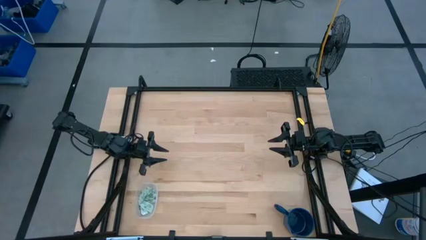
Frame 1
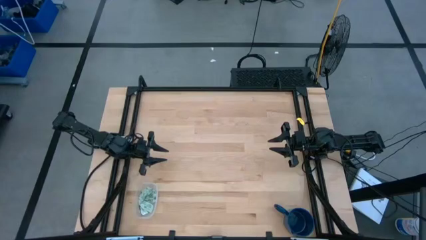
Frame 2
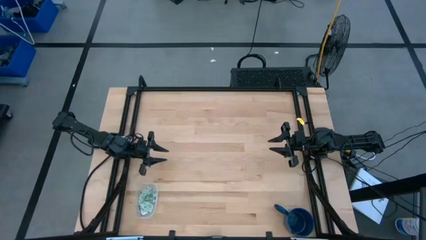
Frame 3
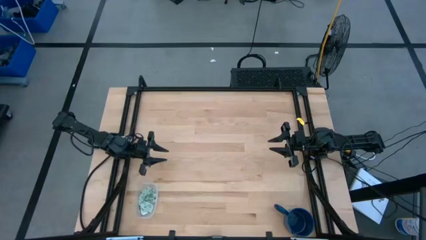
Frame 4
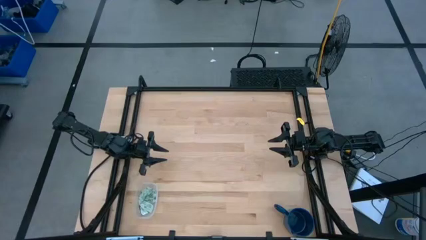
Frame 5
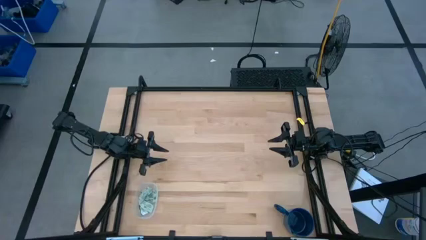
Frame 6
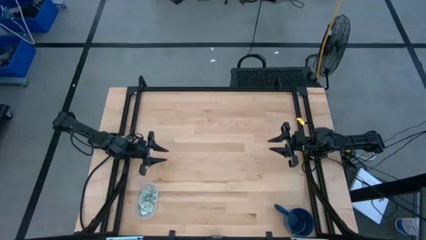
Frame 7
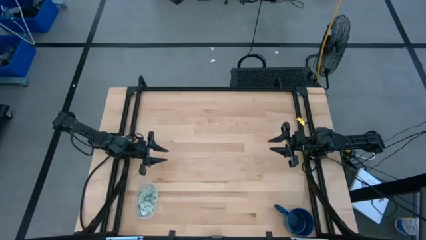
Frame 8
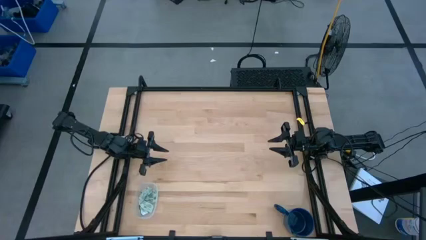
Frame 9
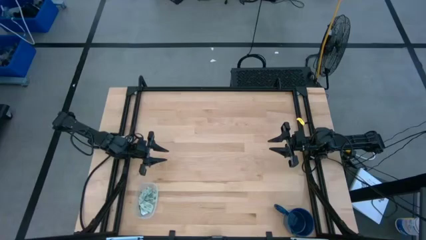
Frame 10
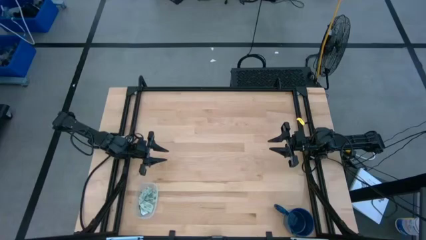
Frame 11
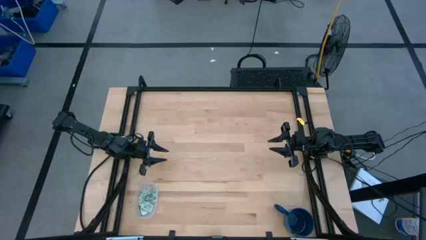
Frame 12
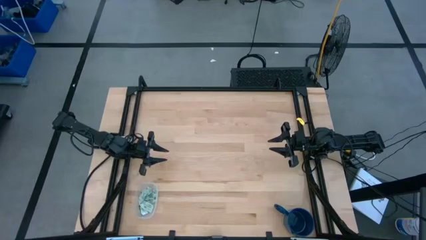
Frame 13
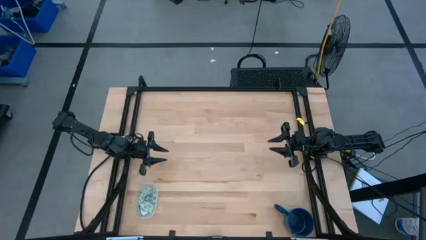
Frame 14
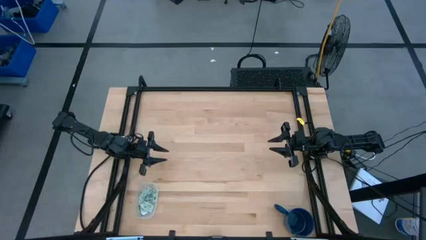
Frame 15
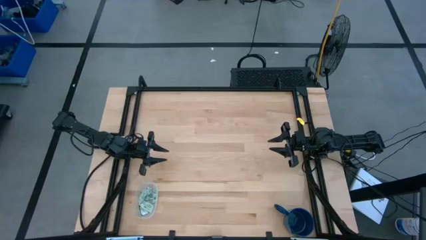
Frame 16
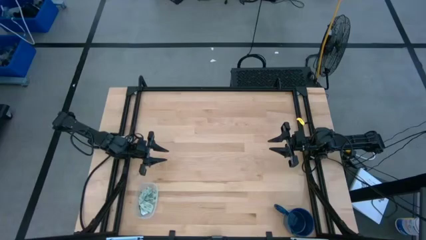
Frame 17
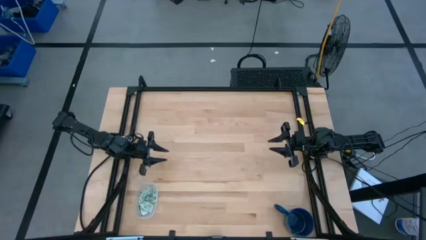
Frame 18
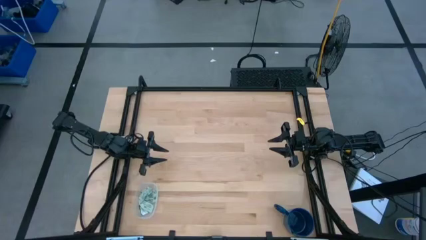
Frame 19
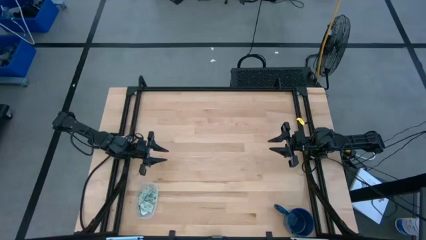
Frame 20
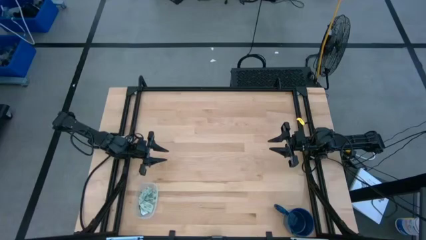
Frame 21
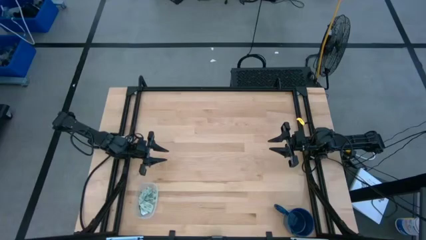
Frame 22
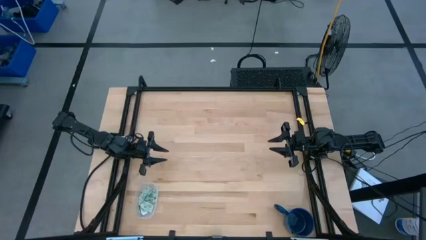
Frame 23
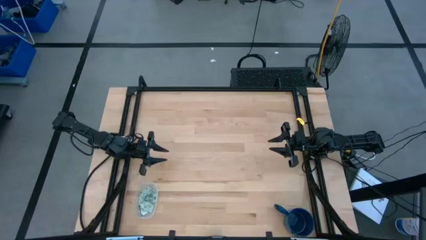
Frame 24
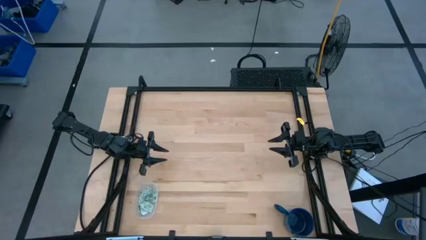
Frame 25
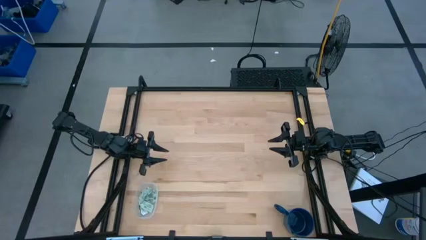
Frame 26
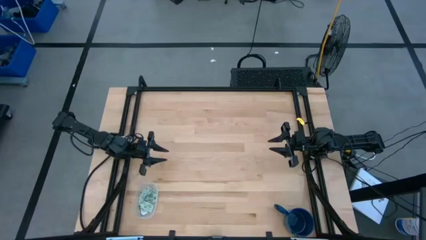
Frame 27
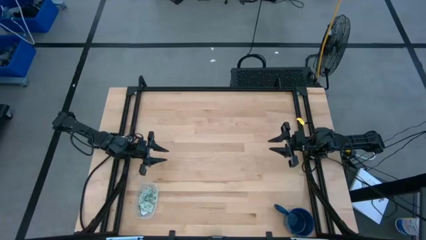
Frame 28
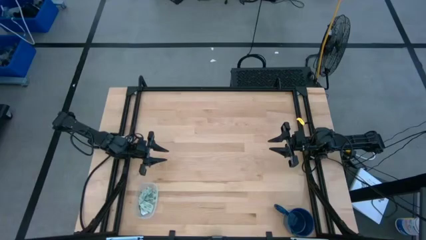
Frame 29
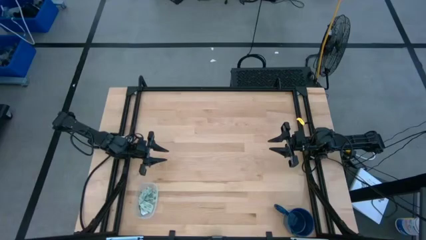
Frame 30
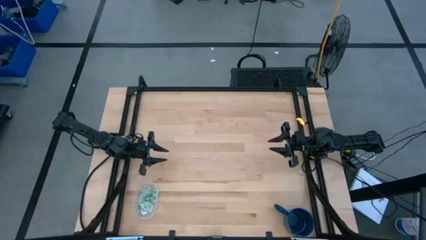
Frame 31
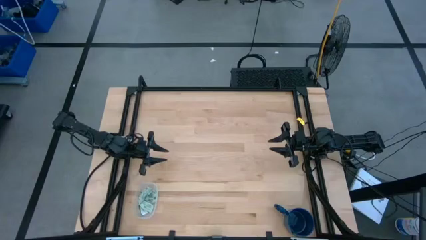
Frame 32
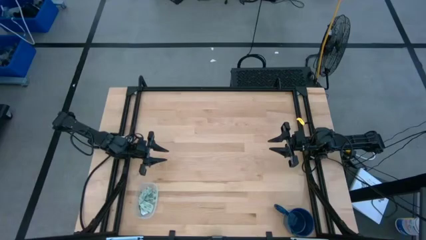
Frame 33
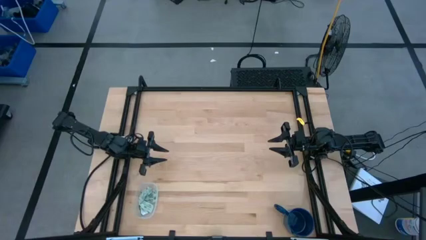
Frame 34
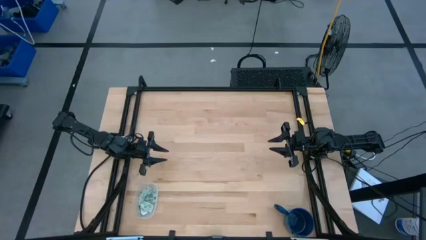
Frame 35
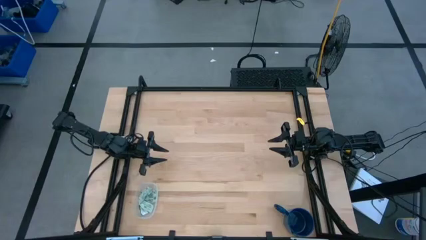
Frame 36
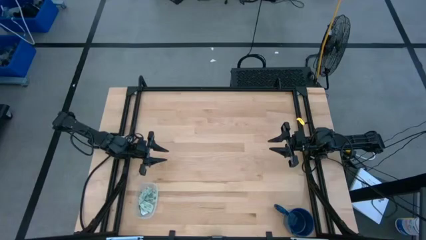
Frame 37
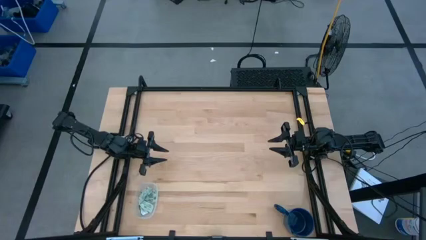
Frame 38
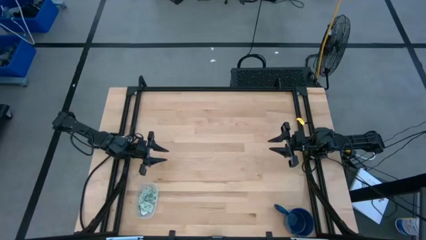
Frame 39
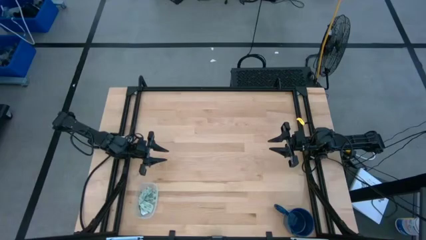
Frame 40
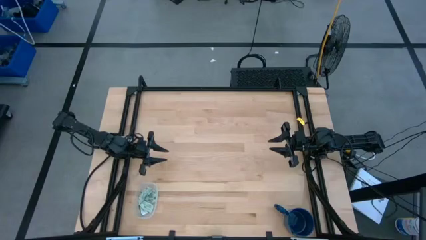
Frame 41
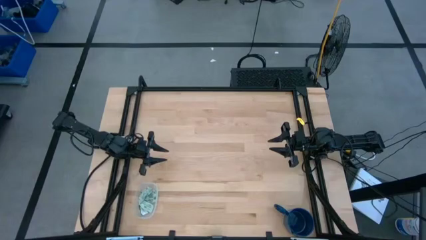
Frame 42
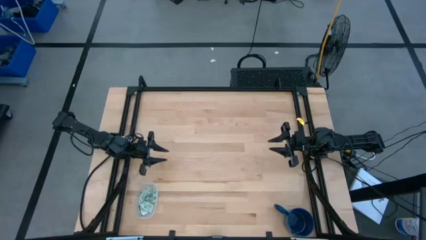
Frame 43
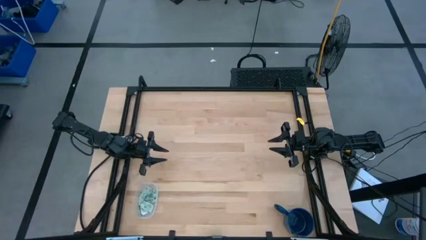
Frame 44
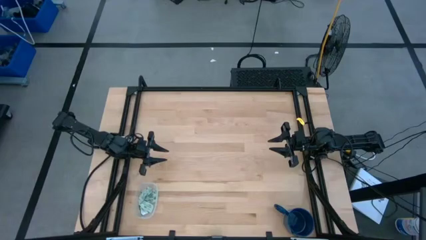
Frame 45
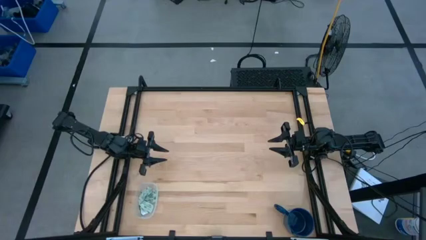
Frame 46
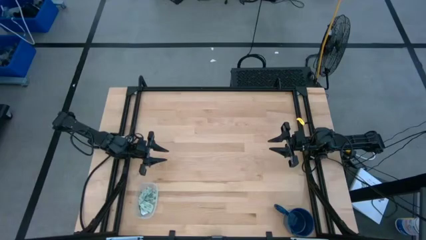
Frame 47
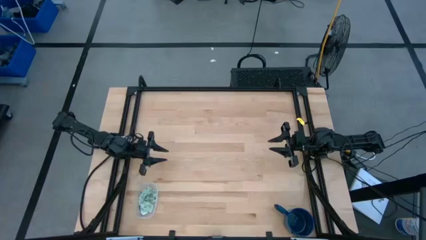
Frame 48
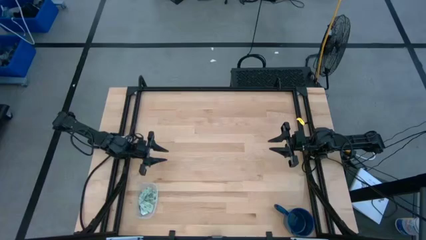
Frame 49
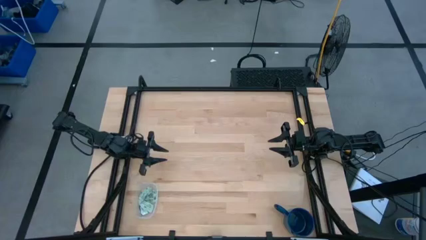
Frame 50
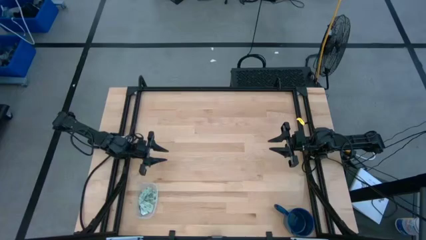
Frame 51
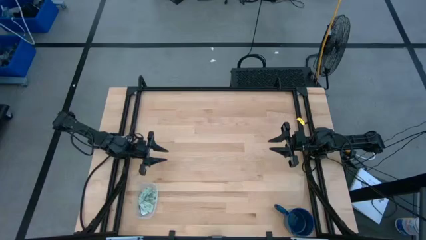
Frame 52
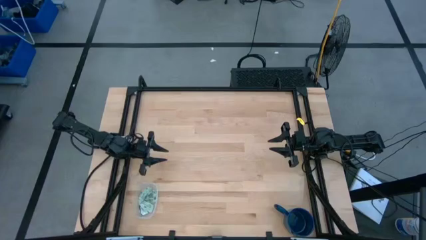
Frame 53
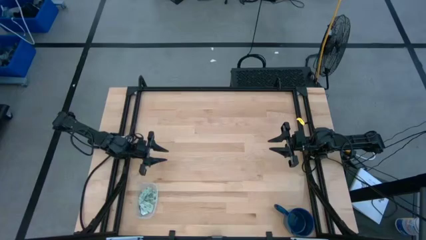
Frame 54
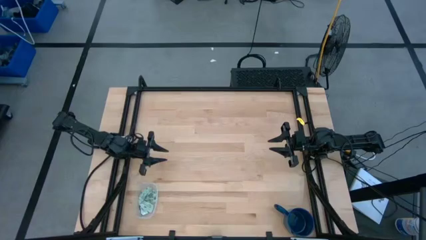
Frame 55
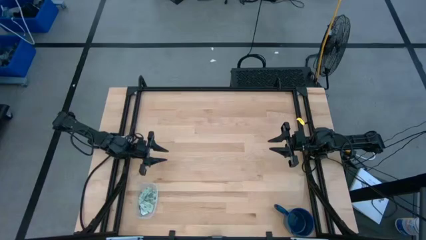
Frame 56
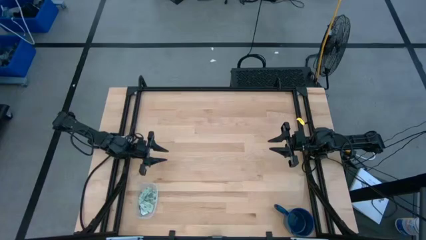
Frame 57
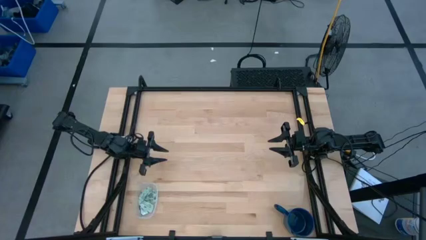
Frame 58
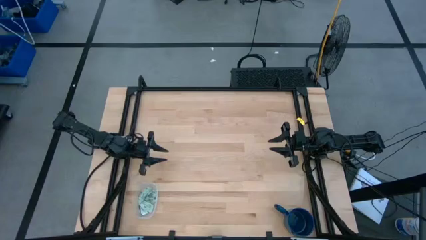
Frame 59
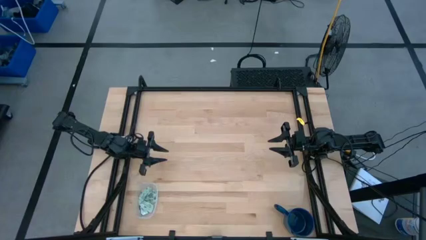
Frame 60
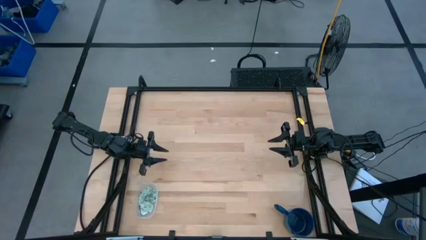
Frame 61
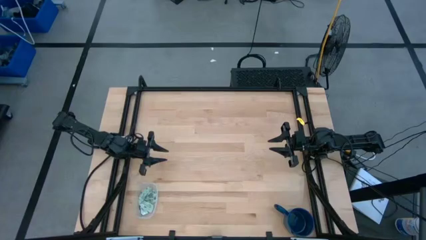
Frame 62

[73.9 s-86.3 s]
Task: Pick and place Stevia / Truvia into bins
Return to Home Position

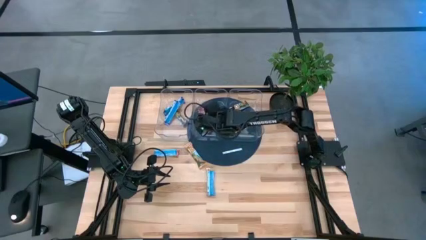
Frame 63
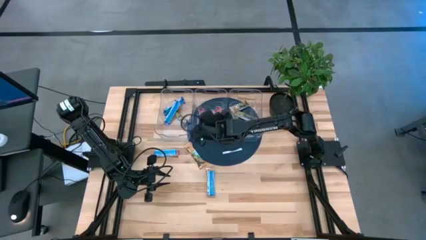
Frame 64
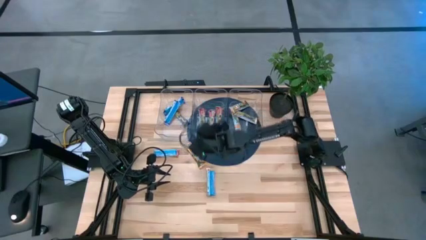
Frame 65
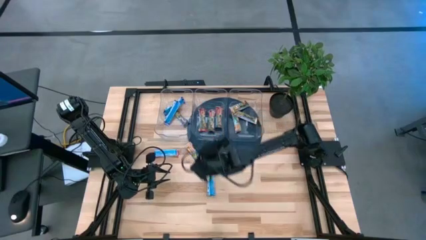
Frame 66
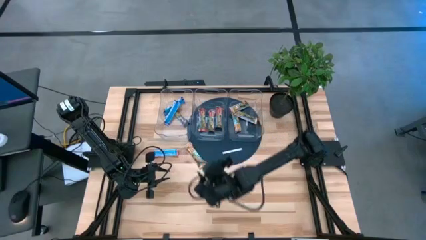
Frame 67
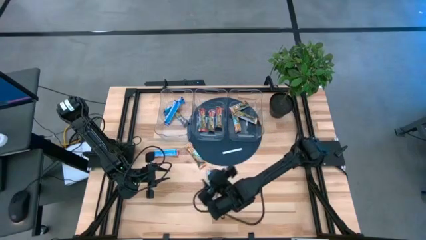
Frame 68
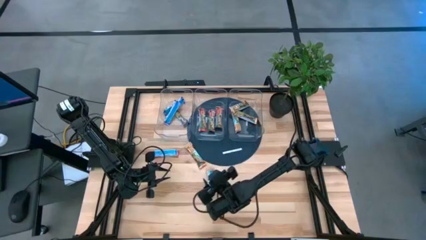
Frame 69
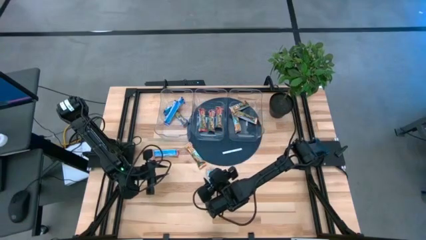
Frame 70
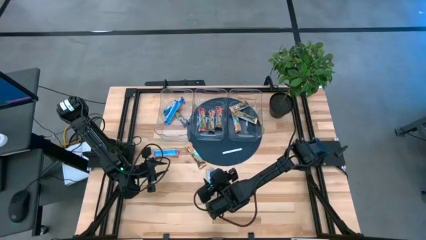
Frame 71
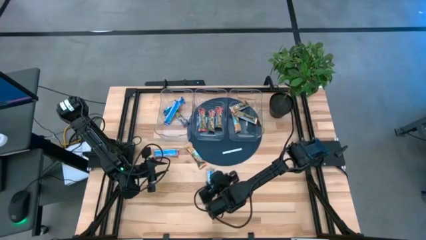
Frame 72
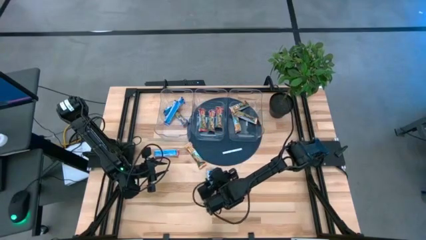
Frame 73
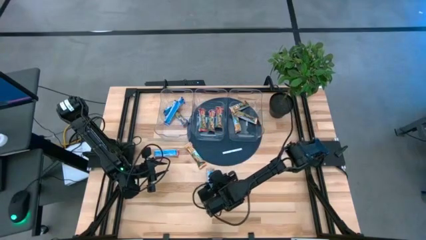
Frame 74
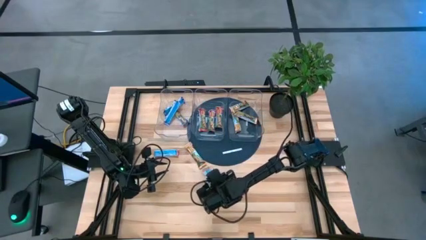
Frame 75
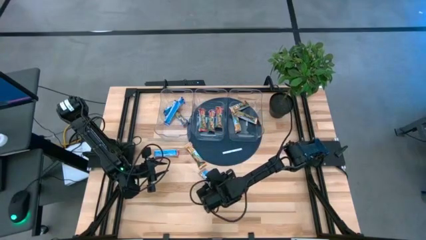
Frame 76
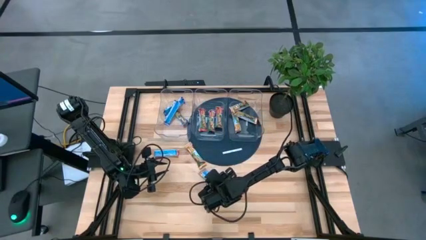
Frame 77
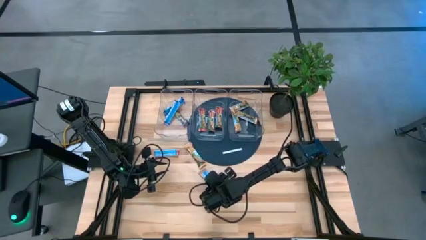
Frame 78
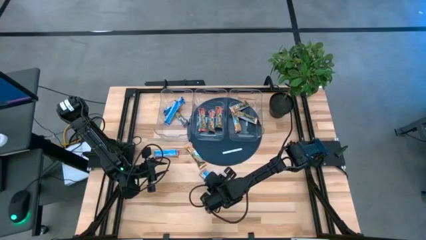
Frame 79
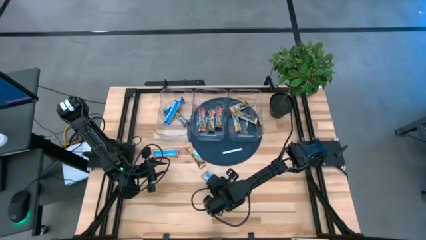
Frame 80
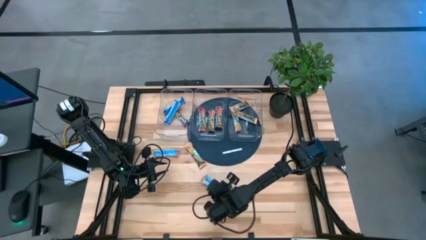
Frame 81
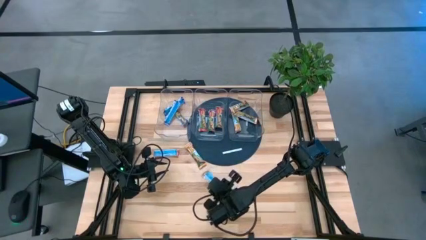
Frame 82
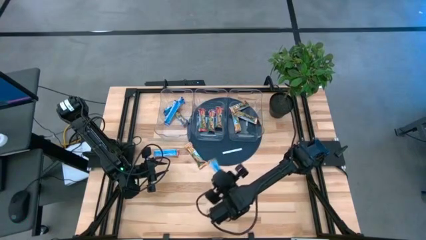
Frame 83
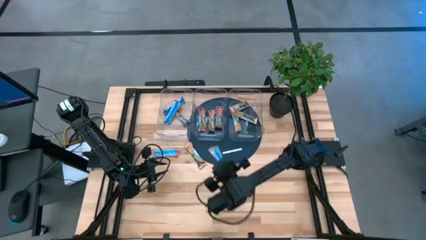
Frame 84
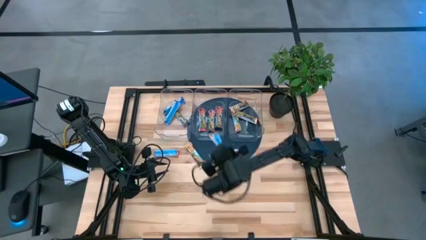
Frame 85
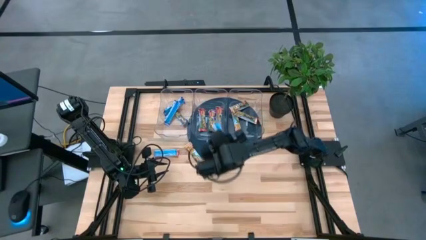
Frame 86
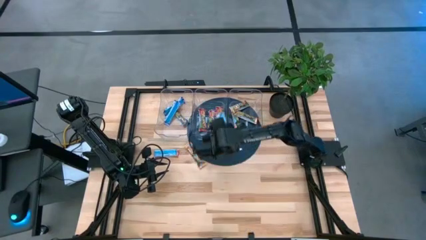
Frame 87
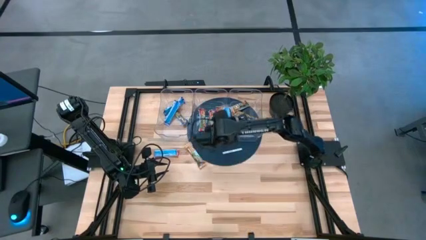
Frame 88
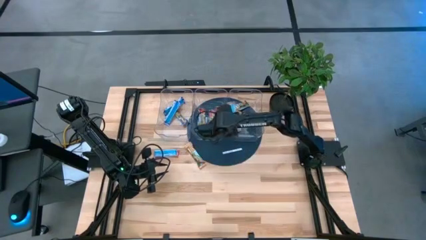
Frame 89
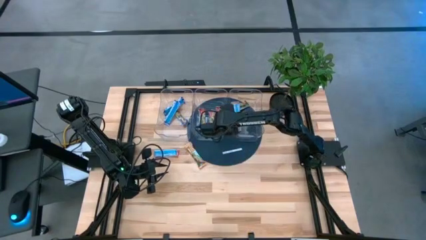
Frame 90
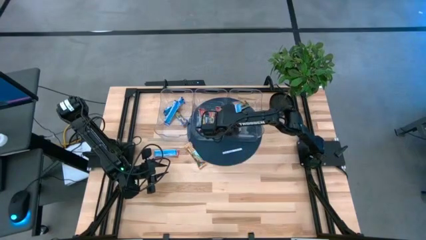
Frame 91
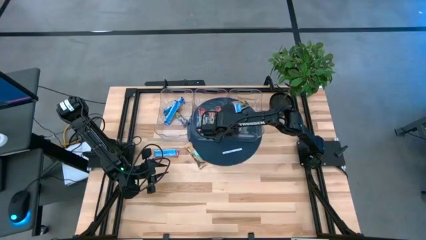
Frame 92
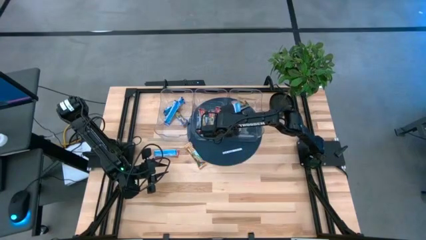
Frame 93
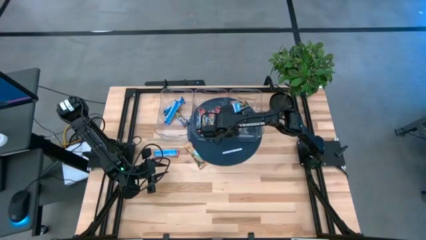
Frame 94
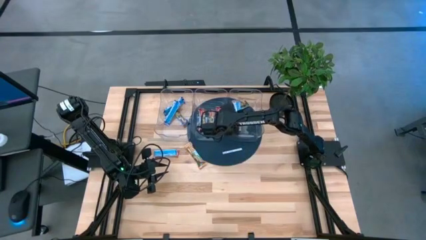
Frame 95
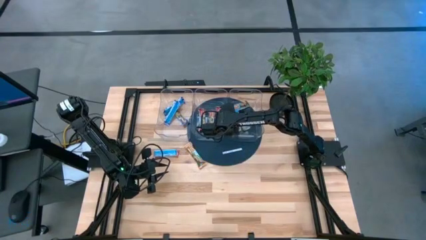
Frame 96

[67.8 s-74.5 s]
Task: Pick and place Granola Bars by type
Put the orange granola bar into the right transparent bin
